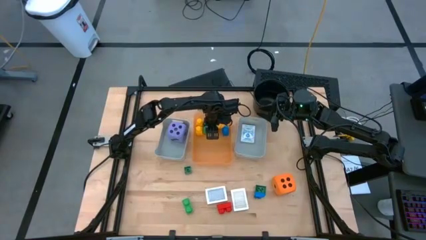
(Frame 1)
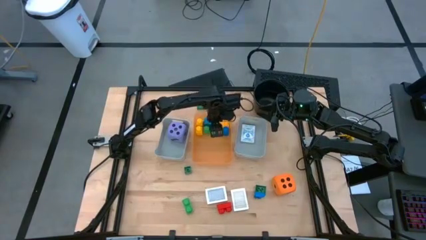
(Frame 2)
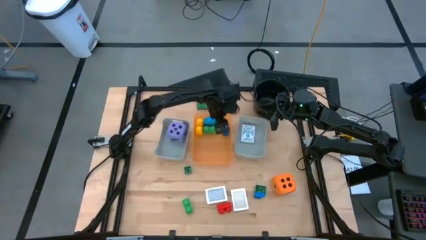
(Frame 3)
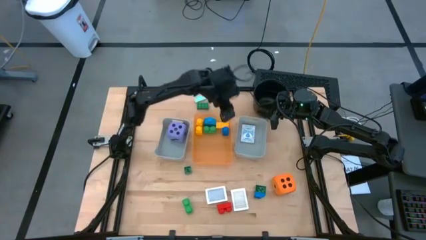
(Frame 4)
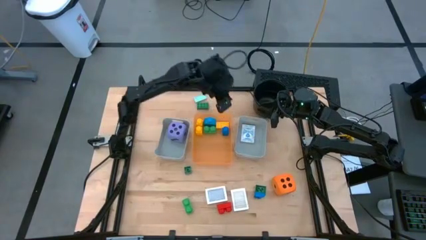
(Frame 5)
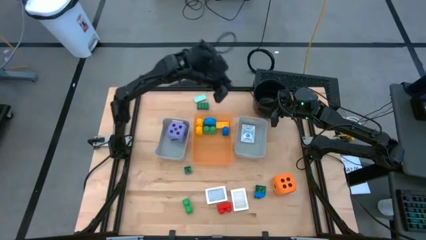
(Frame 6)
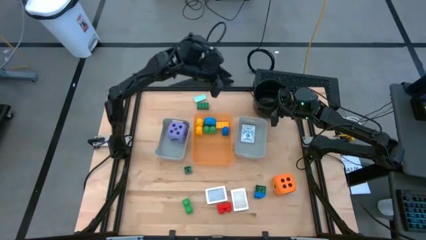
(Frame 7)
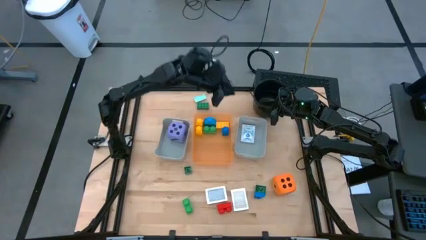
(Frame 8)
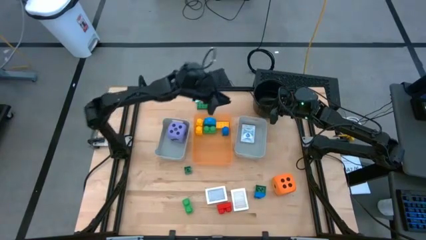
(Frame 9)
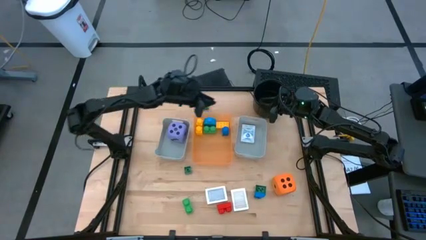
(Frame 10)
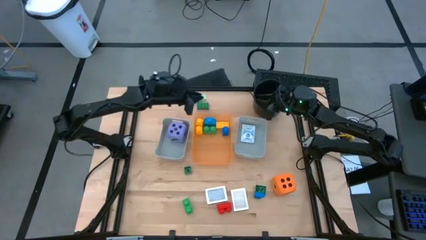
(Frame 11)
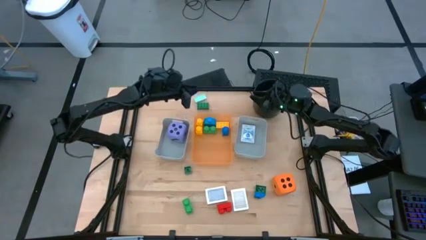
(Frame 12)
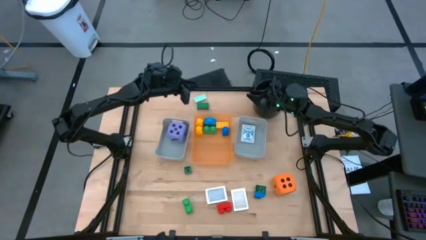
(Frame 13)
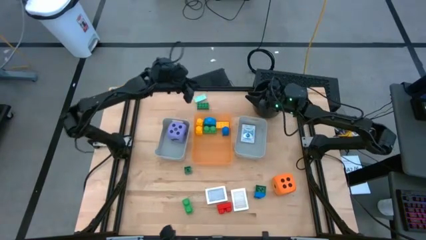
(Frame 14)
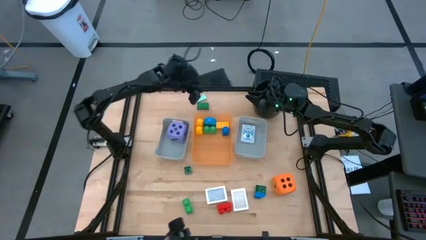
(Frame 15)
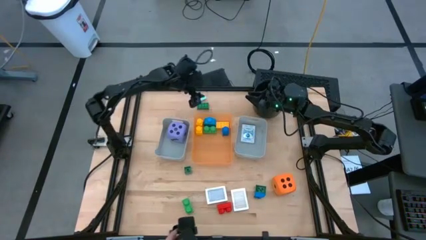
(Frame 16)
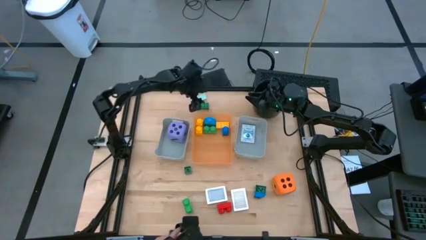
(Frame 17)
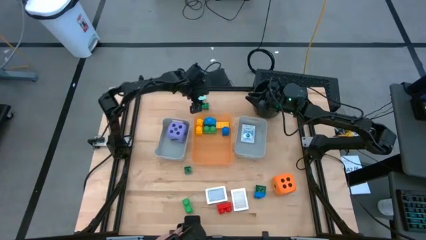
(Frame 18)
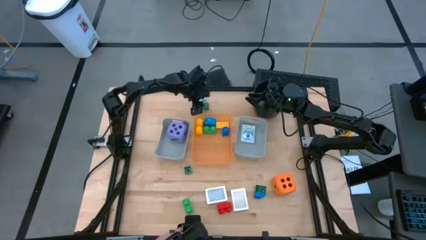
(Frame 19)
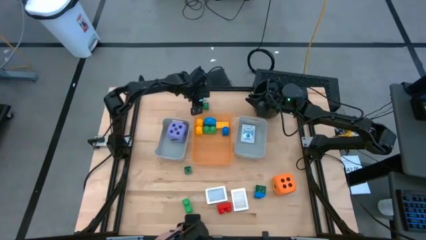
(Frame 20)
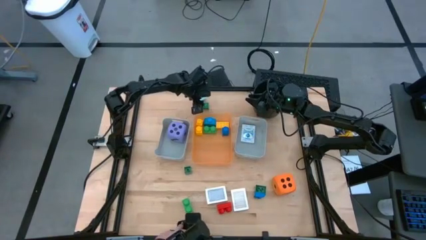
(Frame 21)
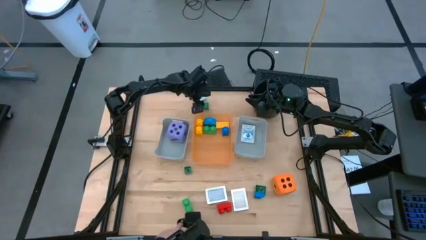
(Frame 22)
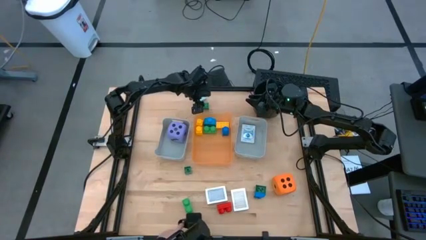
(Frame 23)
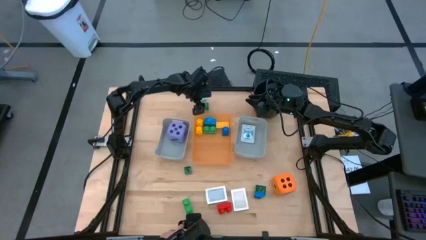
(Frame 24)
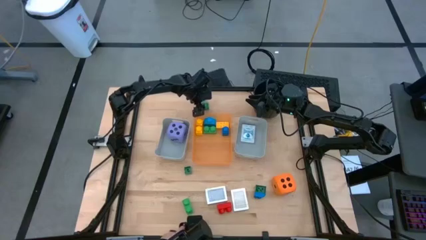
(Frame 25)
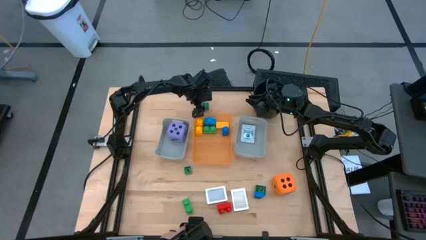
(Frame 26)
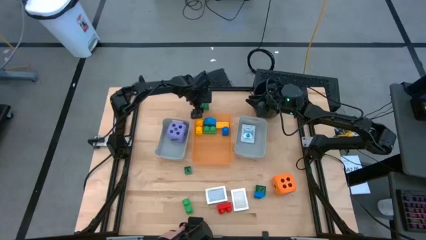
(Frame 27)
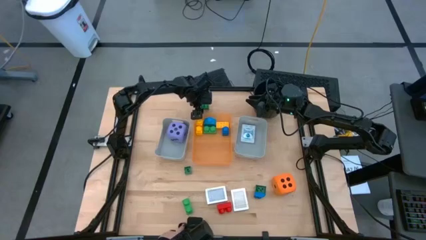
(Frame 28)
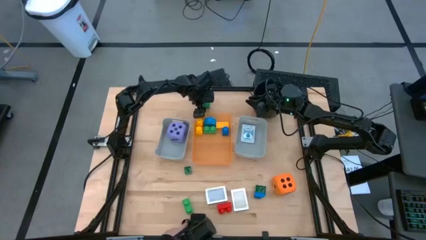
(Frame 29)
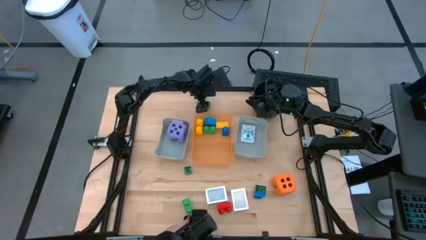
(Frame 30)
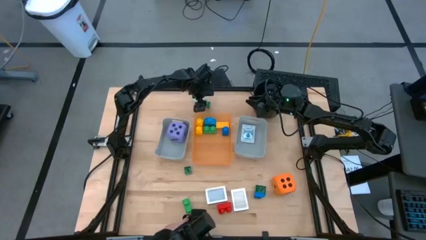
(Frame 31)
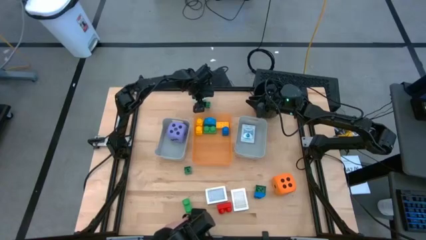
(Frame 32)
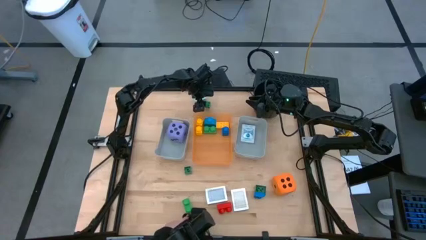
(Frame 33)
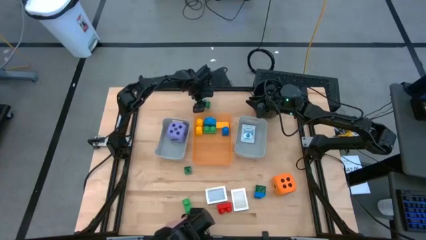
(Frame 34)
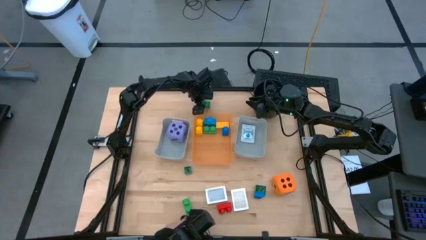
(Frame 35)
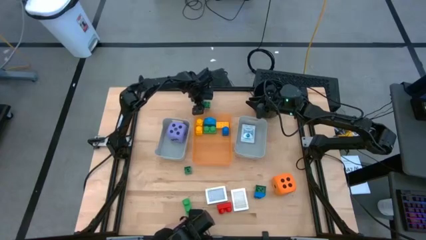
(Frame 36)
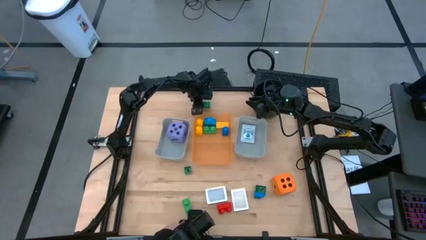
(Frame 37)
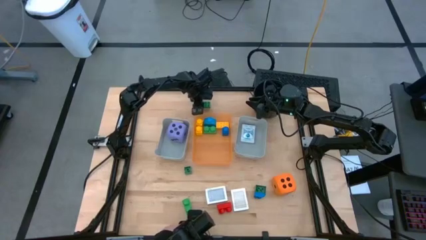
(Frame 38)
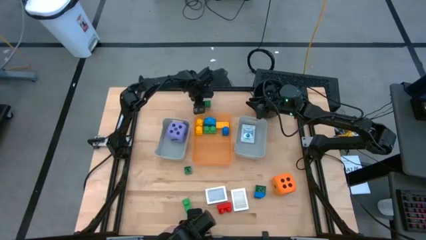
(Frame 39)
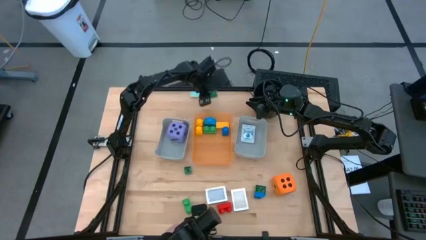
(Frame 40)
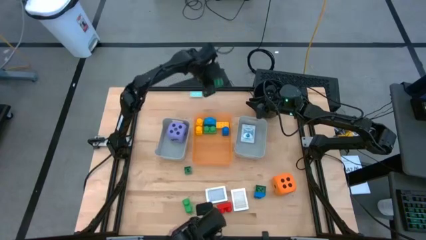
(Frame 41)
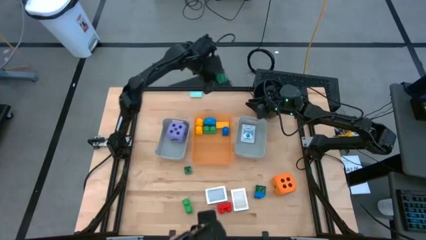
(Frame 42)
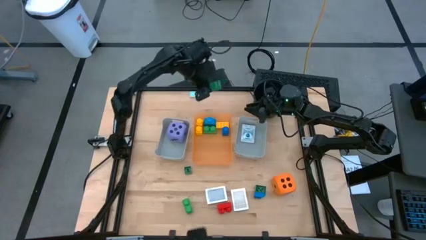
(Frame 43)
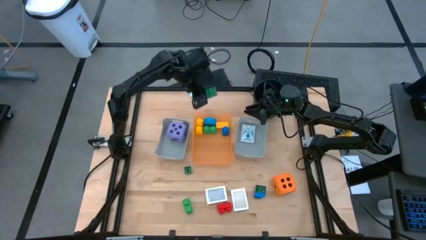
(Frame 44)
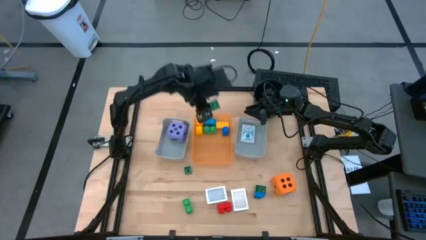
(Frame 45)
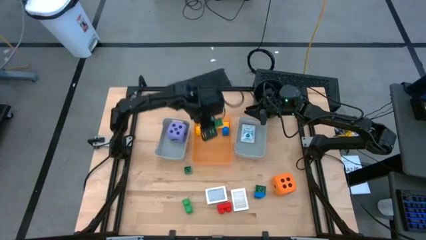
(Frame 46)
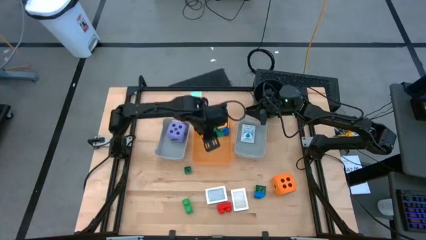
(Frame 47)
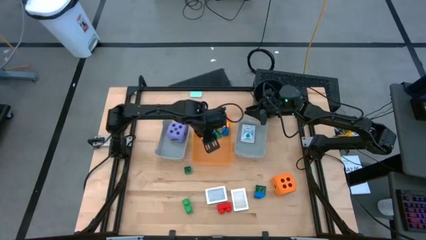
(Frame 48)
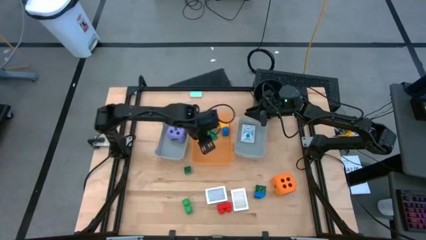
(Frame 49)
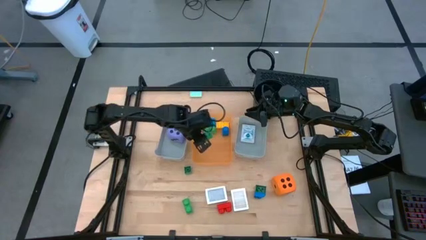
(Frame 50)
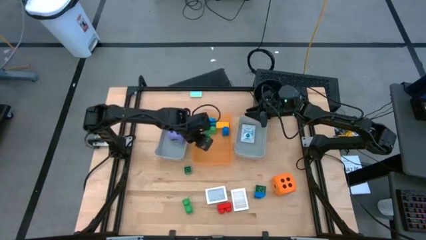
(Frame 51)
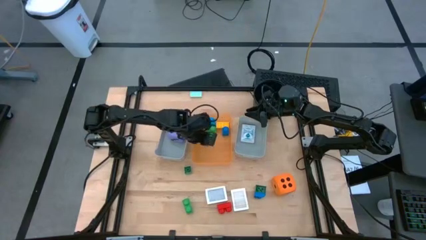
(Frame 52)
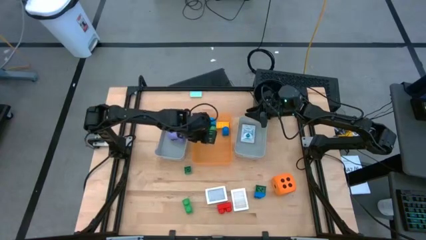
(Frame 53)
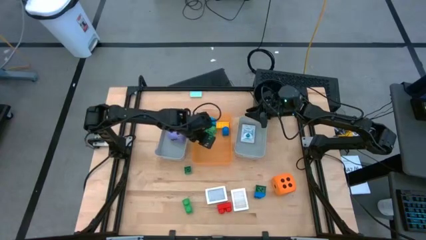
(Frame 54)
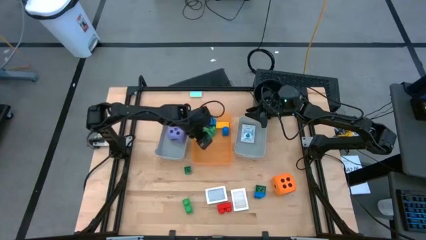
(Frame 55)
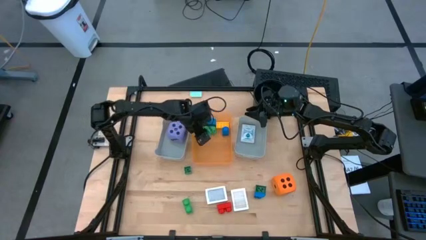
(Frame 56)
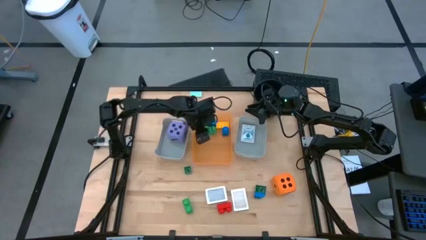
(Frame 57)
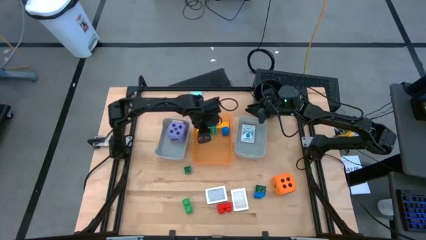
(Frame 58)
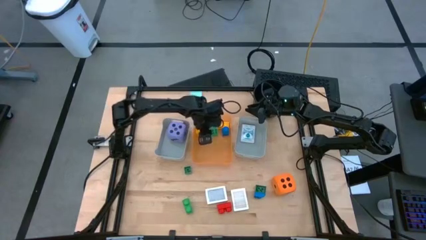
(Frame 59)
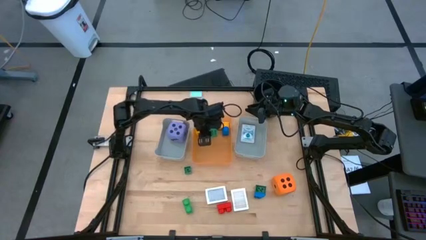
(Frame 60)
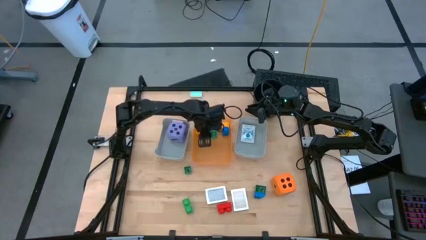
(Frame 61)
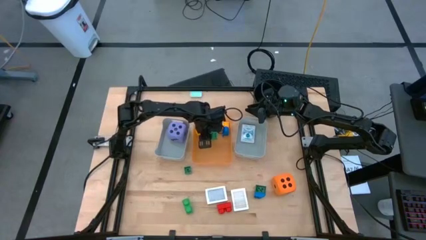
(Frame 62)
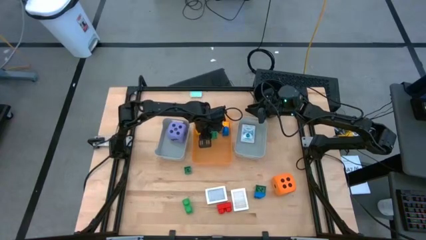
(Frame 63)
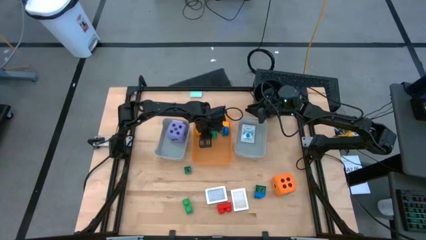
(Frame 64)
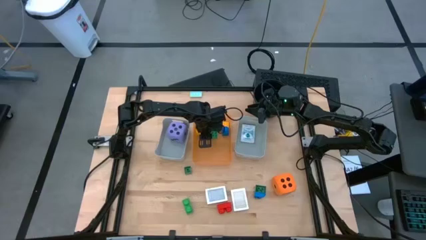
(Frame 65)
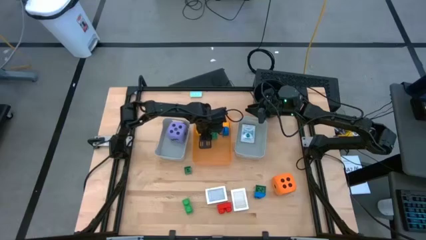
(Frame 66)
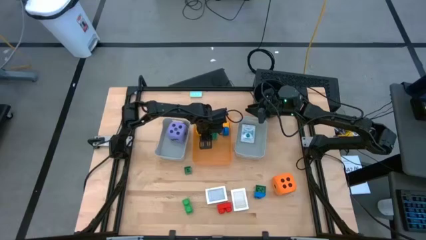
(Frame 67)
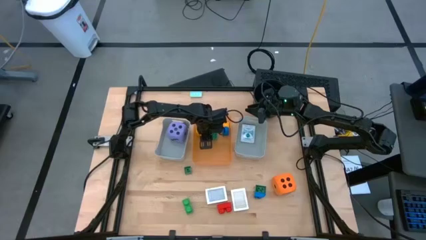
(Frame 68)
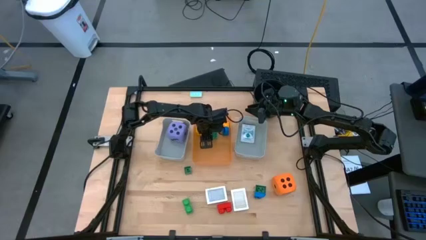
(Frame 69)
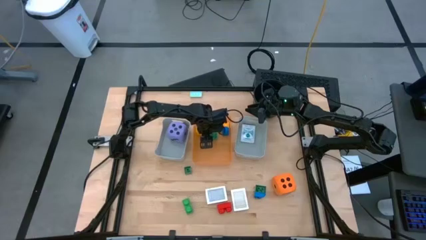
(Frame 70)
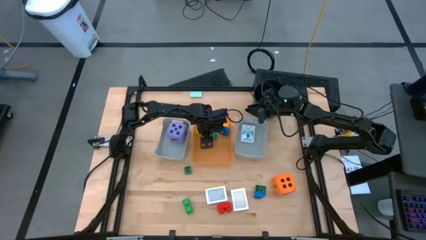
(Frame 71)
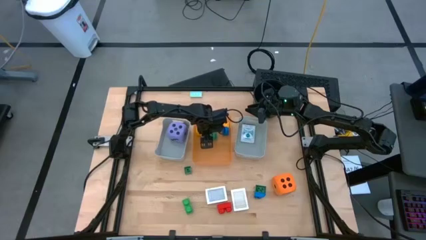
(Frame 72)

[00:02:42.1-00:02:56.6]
Task: Pick & Place Toys
Put the dark green game piece block into the orange bin

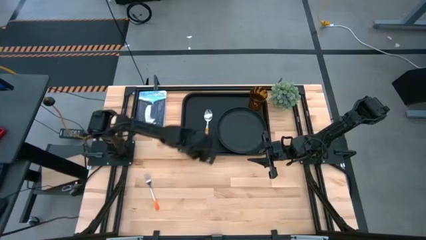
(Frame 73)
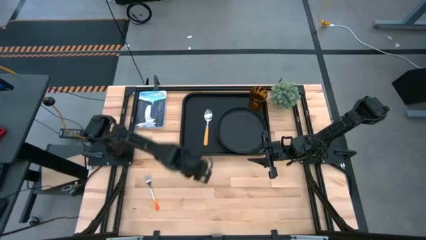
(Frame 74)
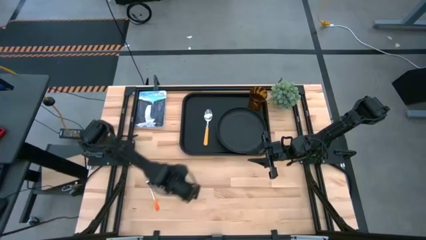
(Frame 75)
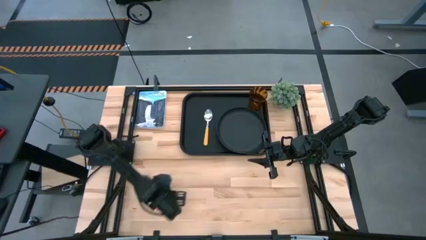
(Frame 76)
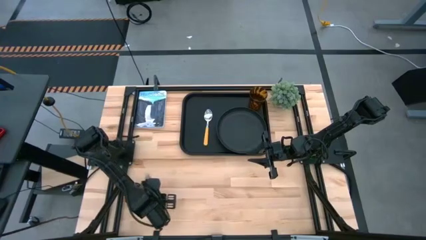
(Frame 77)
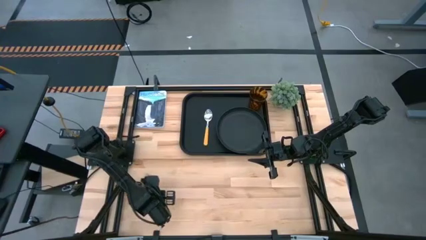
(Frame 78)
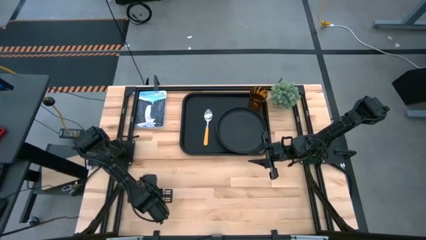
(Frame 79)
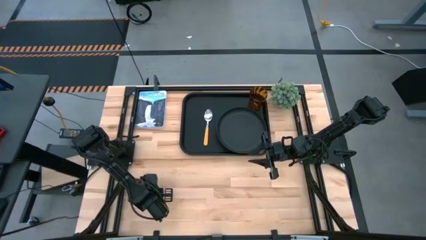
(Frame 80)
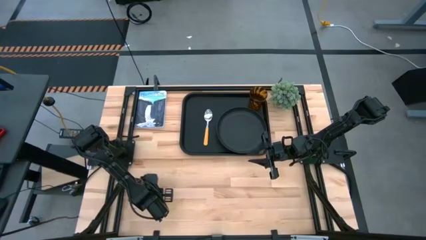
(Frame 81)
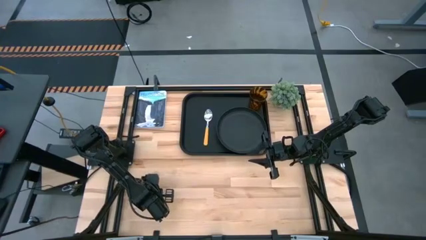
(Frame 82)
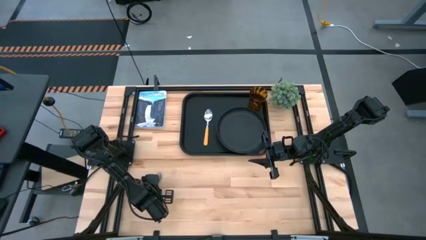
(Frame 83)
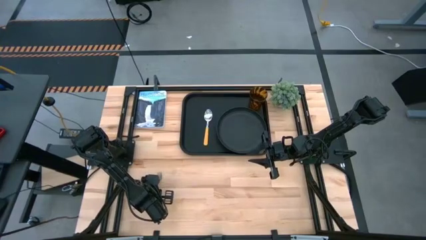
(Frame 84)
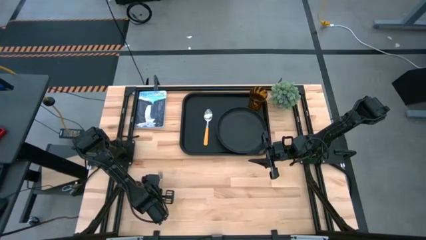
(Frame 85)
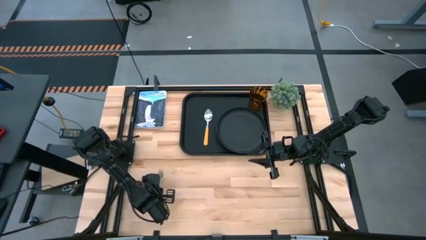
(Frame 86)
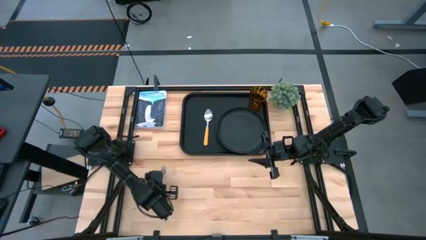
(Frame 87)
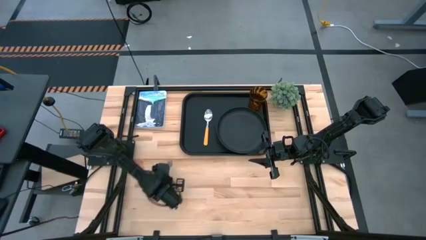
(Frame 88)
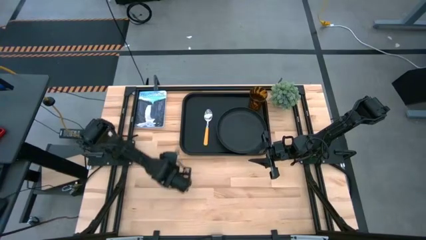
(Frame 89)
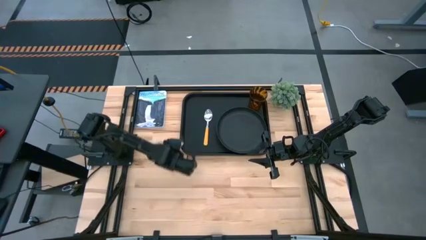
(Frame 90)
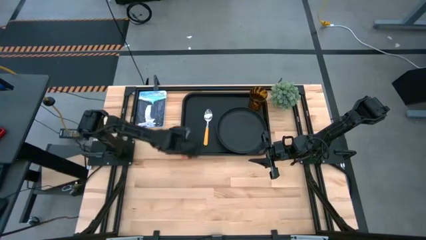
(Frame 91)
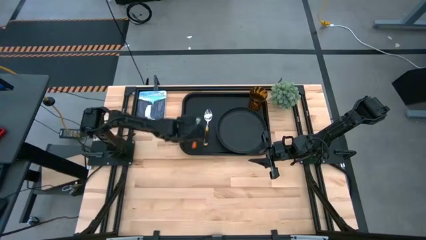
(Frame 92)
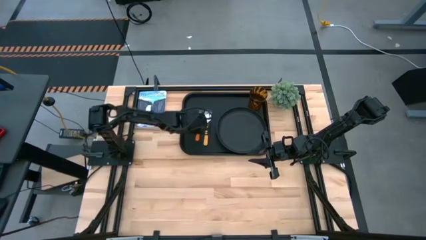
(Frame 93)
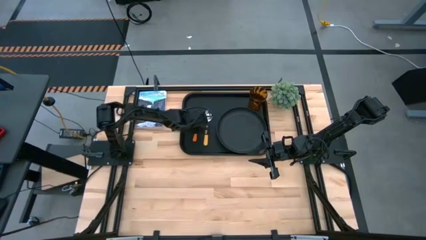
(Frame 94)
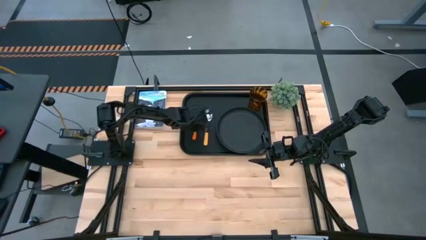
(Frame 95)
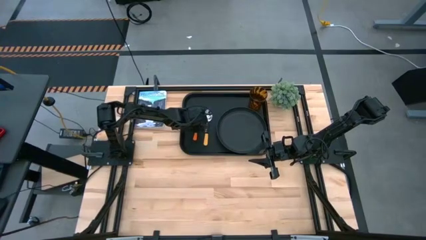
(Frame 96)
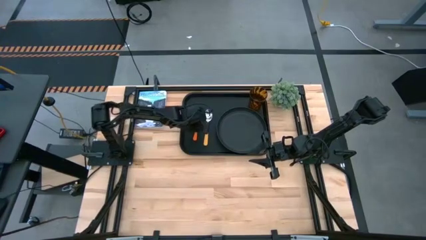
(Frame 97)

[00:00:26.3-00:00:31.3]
Task: Pick and place plate/cup/fork/spoon on tray
Put the orange fork on the black tray to the left of the yellow spoon
